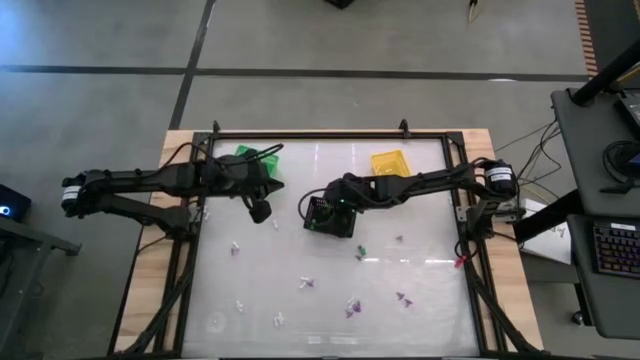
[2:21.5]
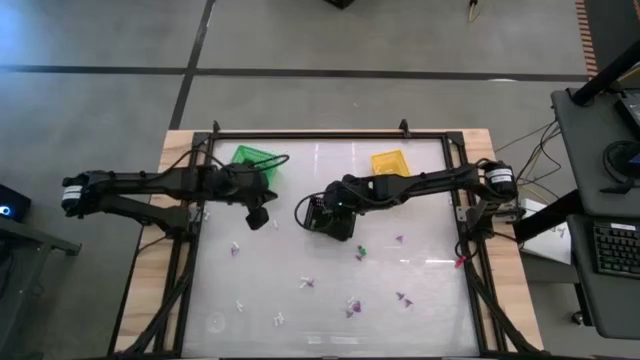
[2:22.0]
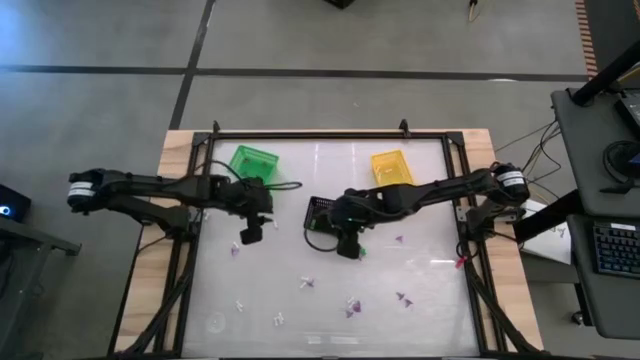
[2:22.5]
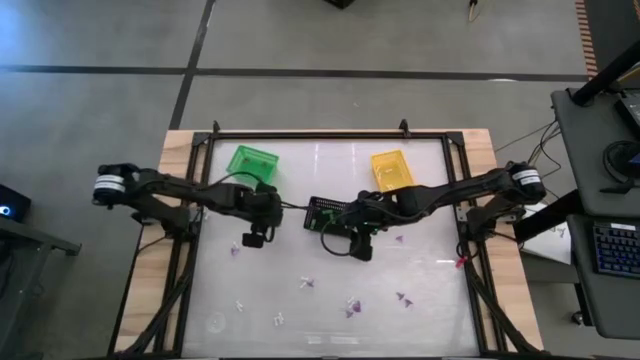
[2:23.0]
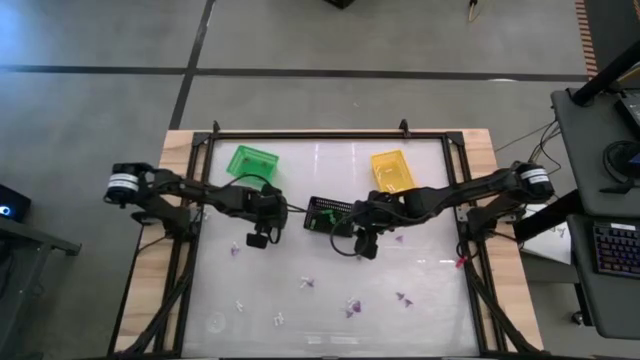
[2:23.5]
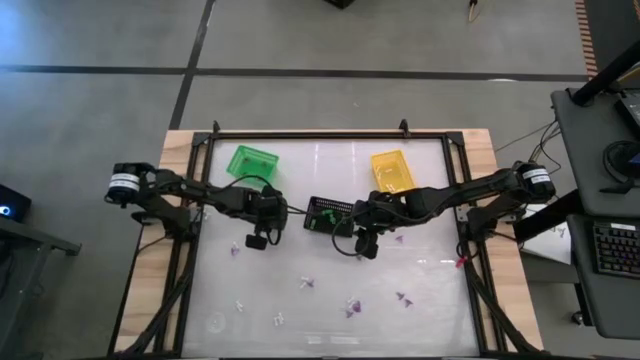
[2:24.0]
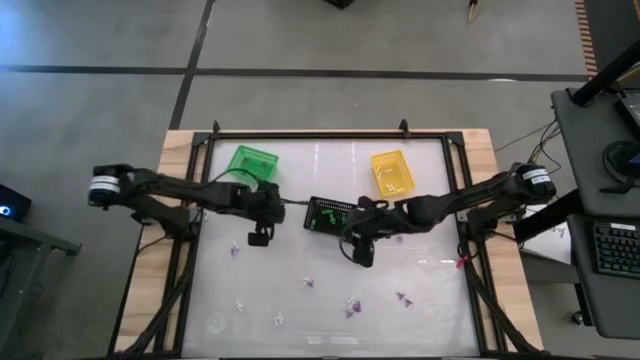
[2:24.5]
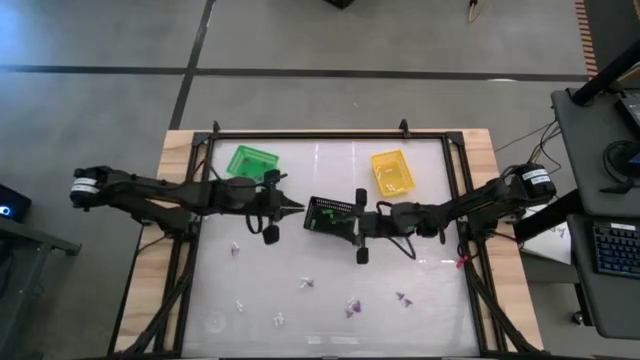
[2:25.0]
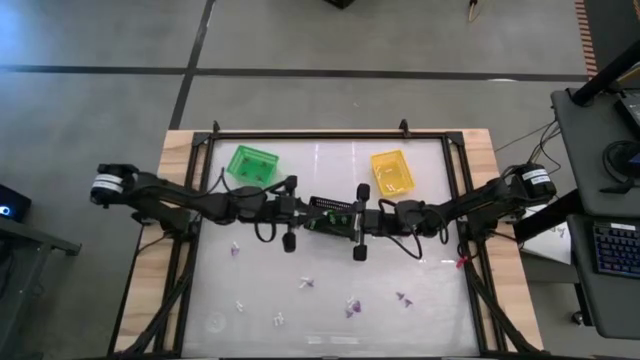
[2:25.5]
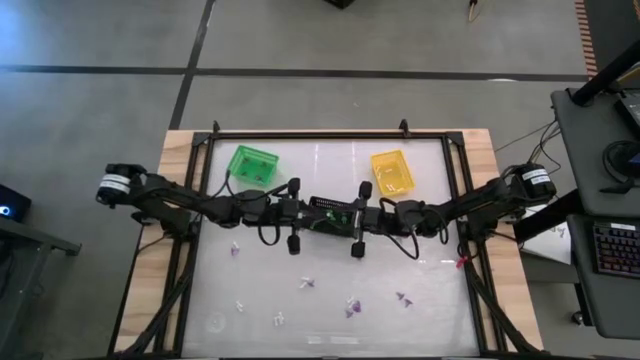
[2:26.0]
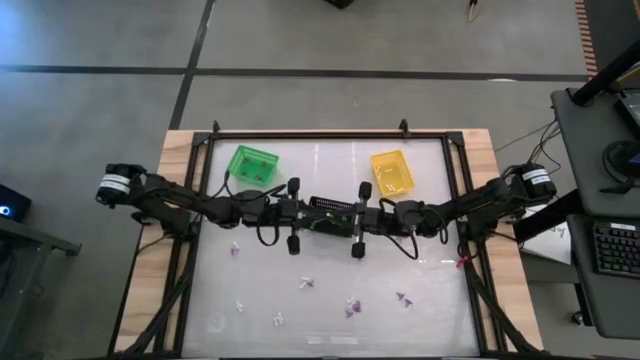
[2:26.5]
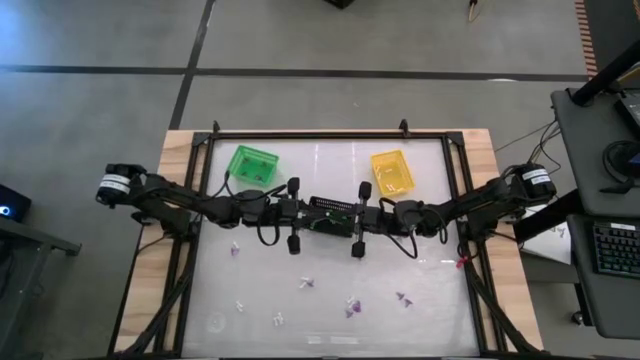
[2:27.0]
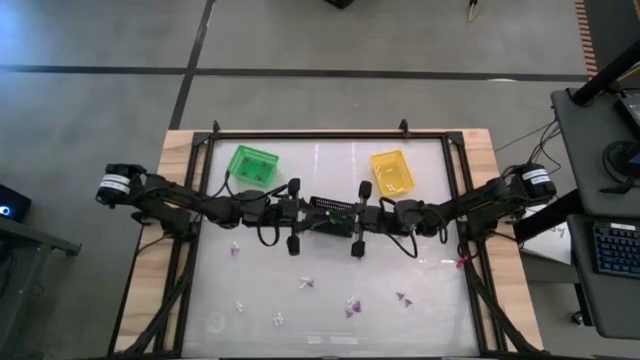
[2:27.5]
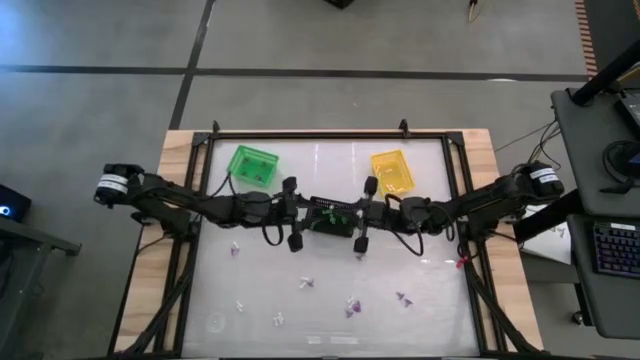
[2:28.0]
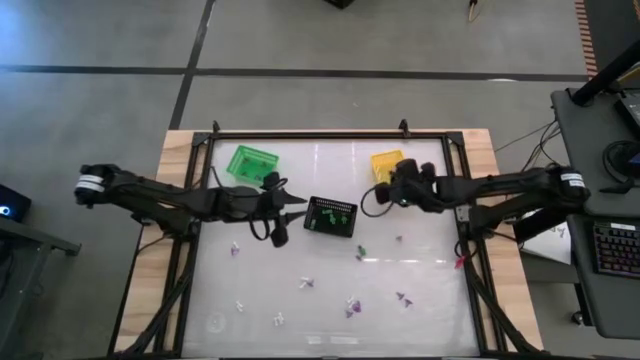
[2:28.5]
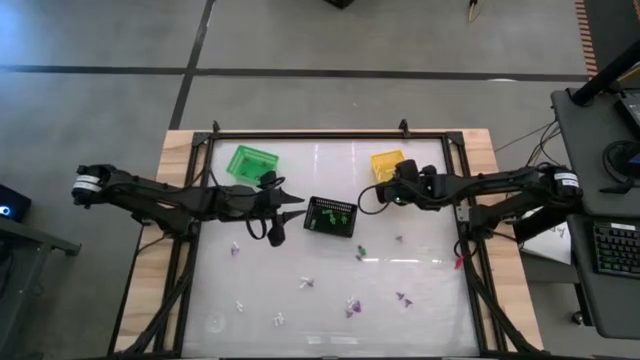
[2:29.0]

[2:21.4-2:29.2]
Task: Sort Halloween decoration
Put the white bone toy into the yellow bin

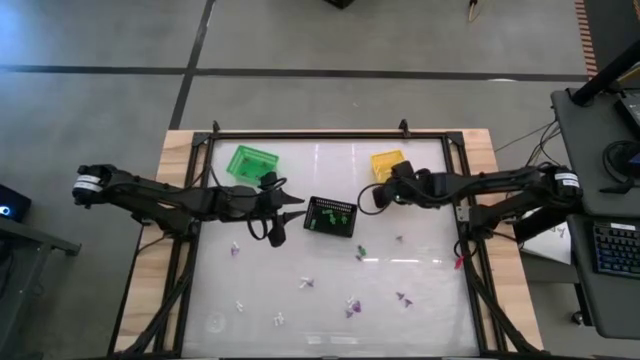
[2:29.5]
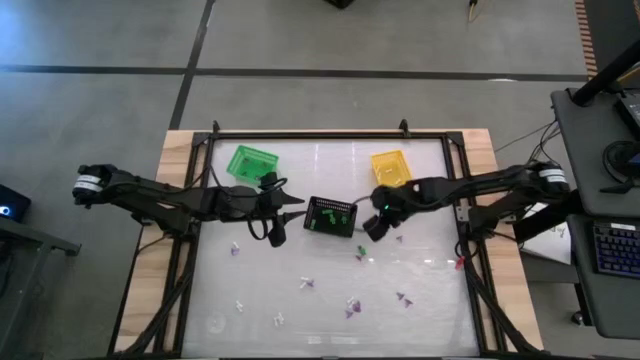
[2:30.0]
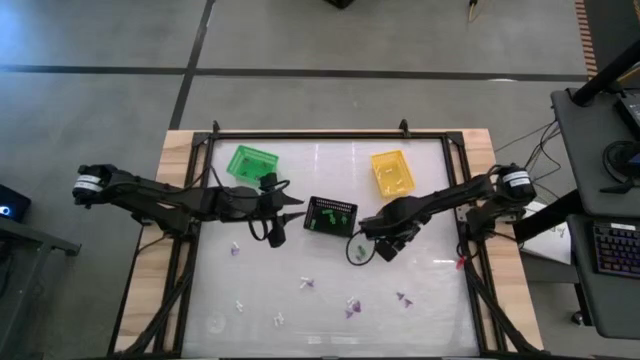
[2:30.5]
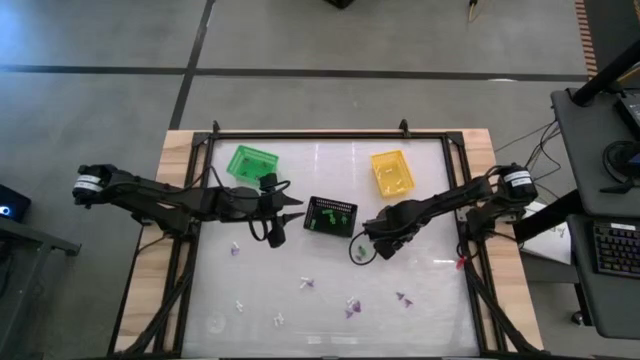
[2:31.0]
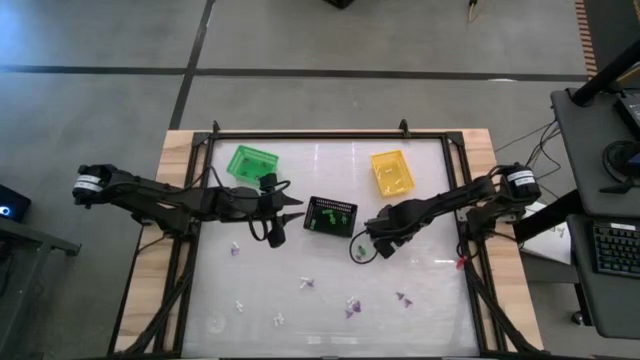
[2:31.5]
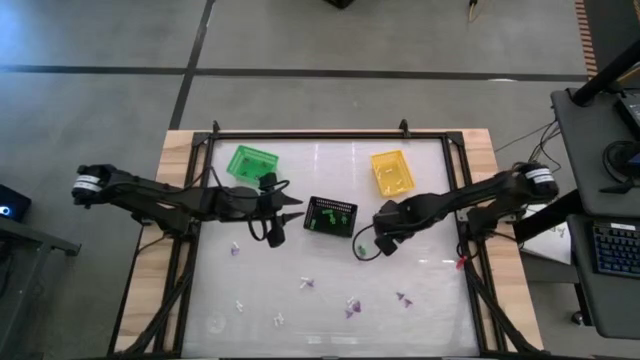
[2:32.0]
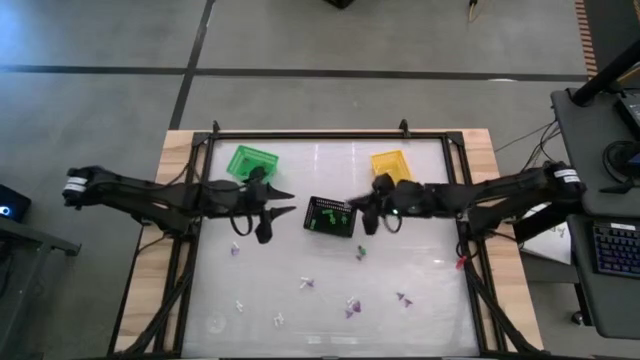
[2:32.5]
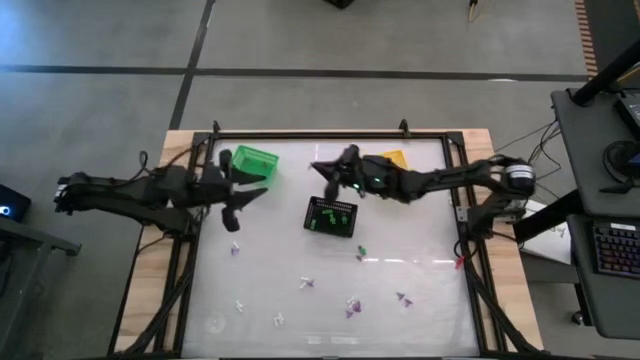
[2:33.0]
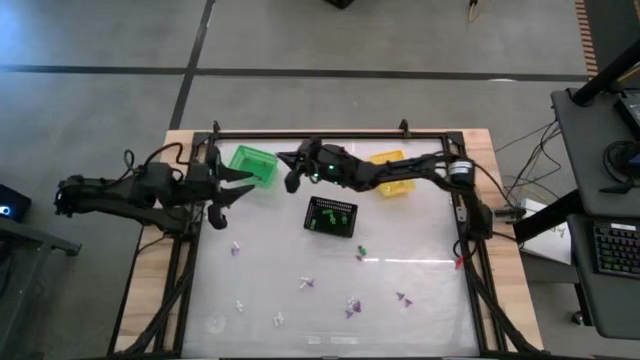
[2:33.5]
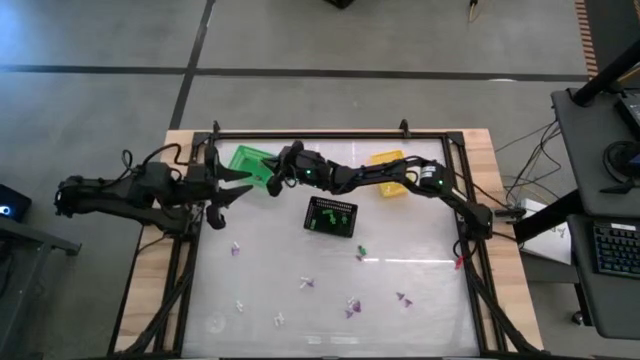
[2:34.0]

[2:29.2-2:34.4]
Put the purple witch hat toy into the green bin

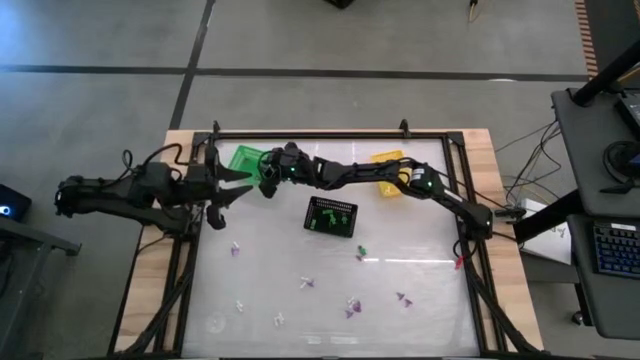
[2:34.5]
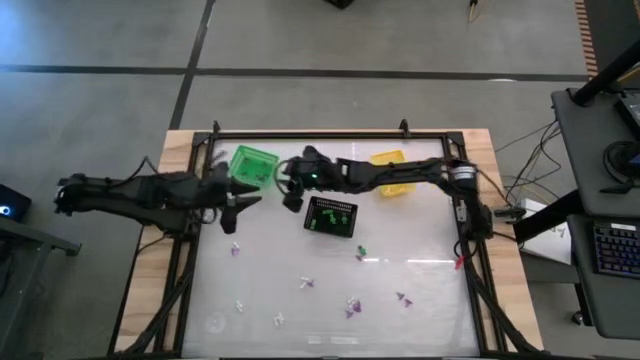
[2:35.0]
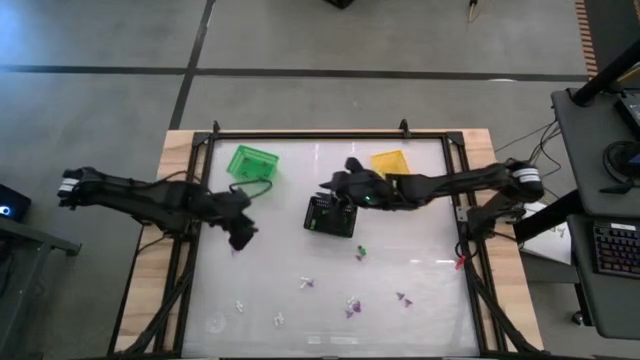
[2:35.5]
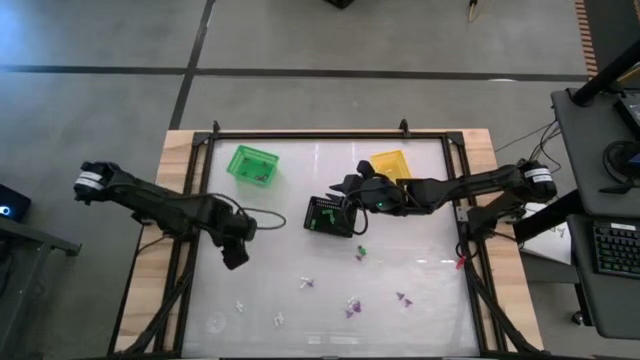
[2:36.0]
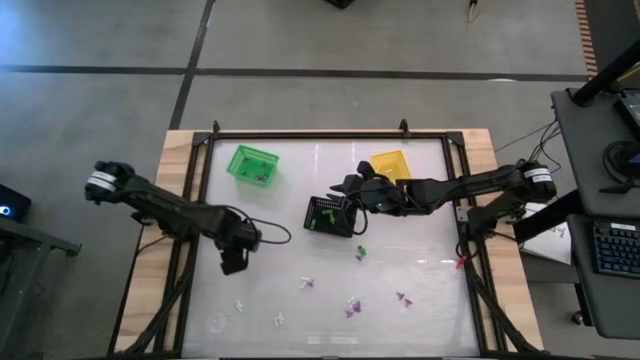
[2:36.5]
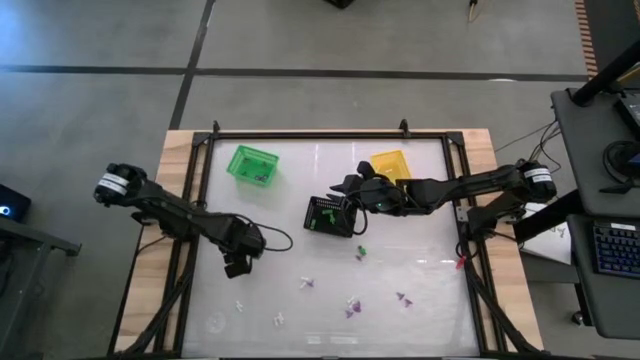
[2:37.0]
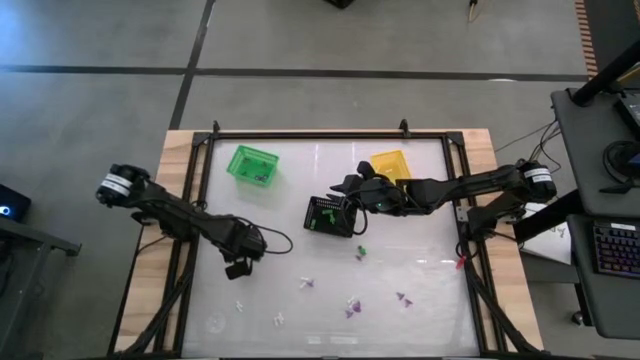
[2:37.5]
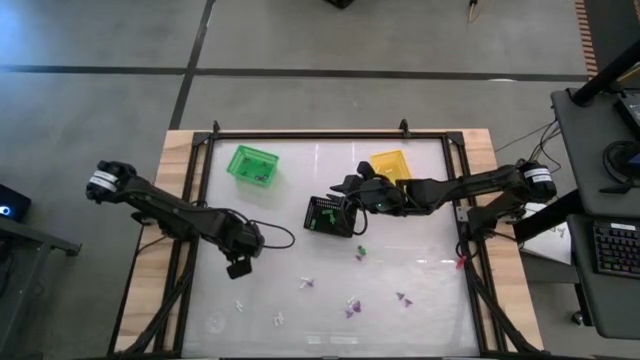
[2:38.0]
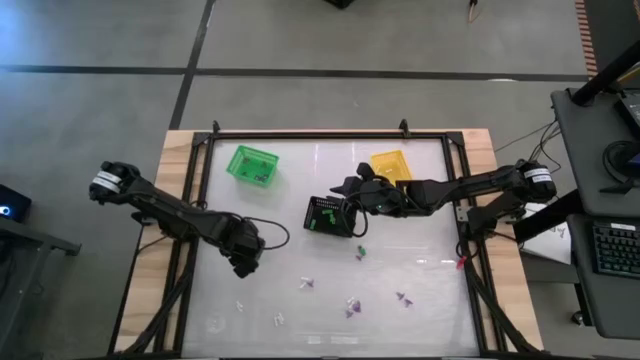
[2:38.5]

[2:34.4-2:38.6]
Put the purple witch hat toy into the green bin

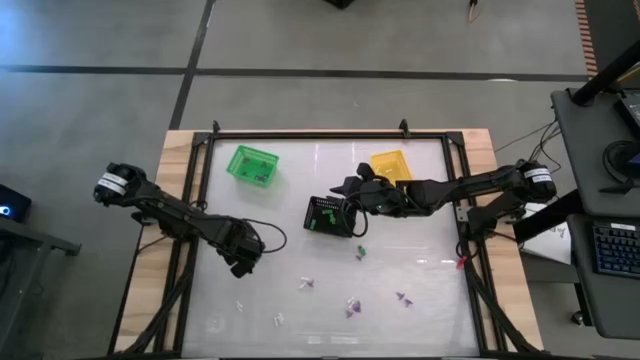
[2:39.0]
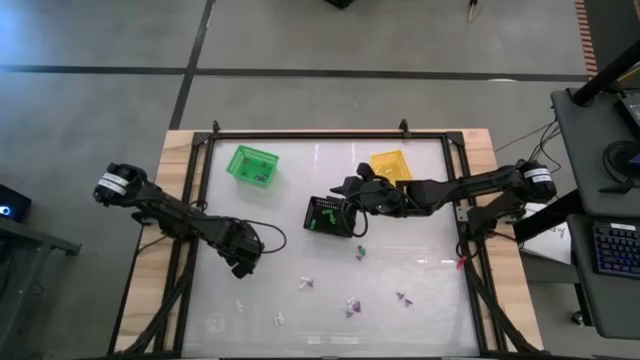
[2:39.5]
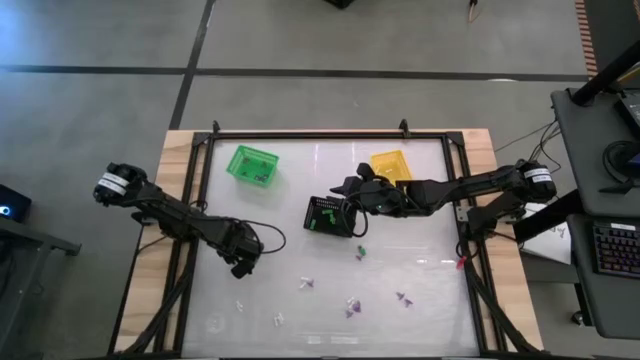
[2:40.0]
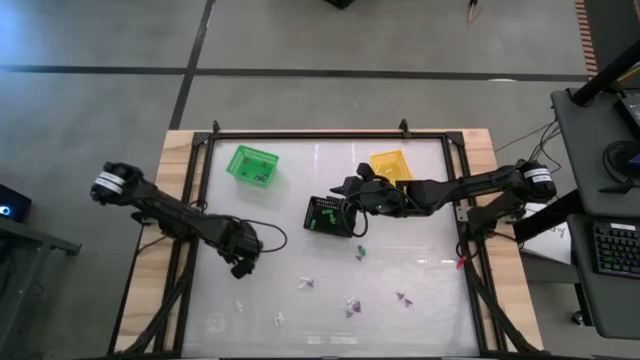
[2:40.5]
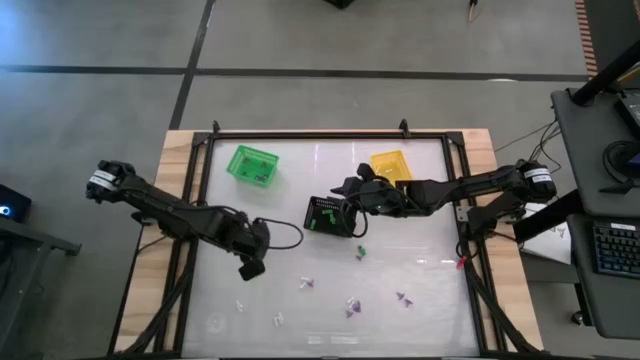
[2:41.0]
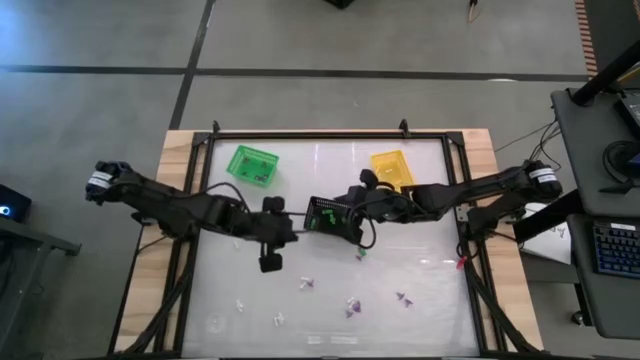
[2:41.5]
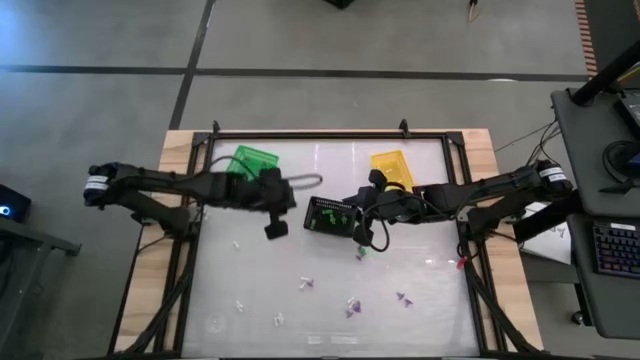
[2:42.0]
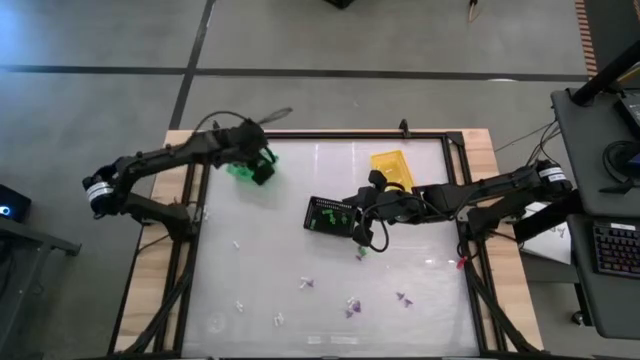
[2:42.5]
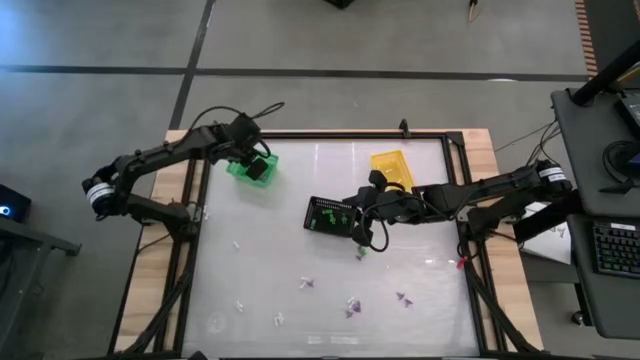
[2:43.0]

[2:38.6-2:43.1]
Put the purple witch hat toy into the green bin
